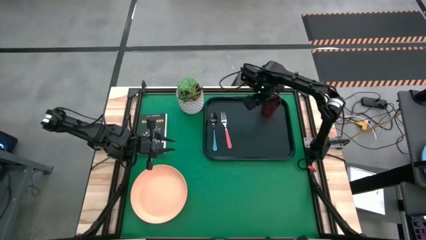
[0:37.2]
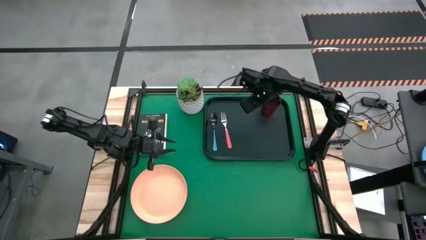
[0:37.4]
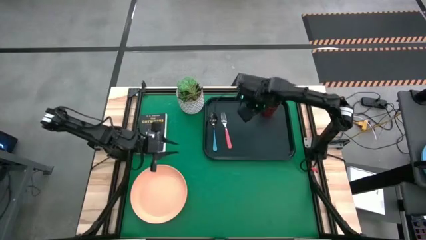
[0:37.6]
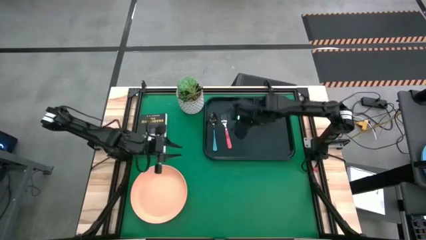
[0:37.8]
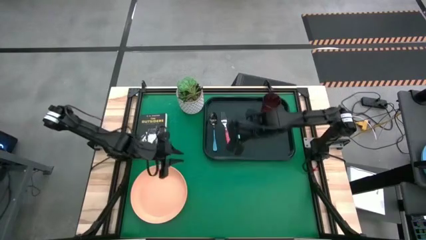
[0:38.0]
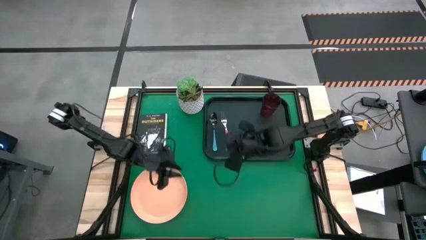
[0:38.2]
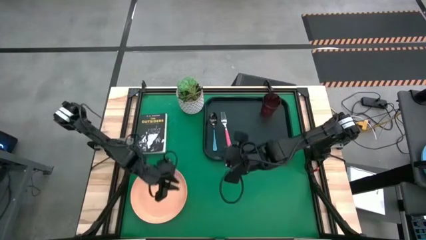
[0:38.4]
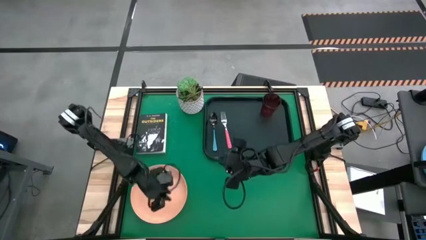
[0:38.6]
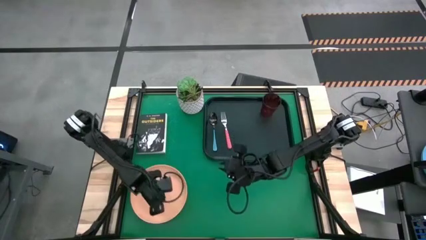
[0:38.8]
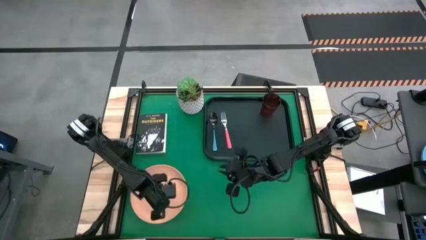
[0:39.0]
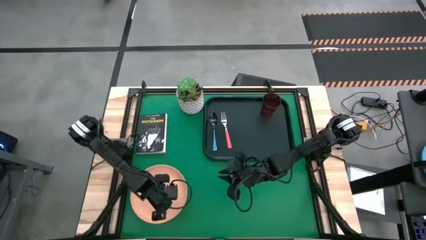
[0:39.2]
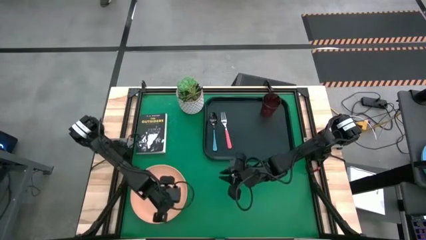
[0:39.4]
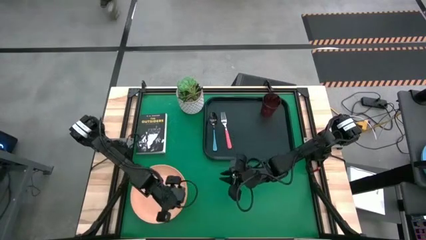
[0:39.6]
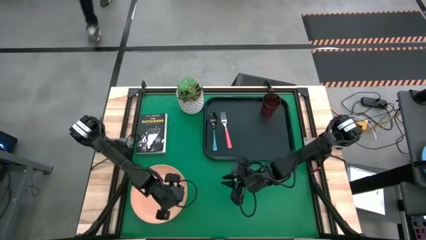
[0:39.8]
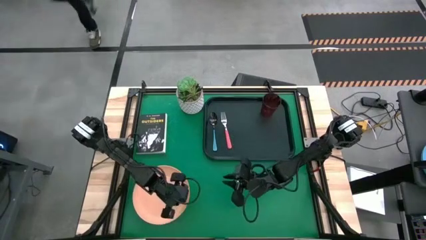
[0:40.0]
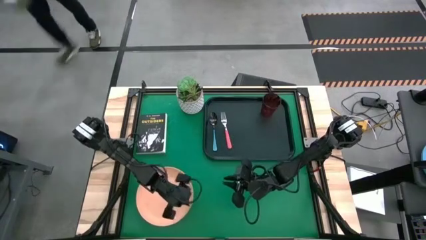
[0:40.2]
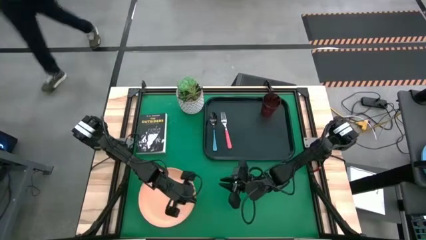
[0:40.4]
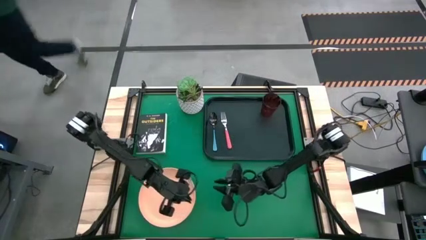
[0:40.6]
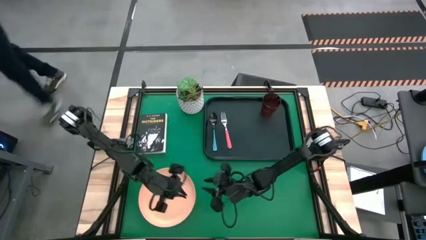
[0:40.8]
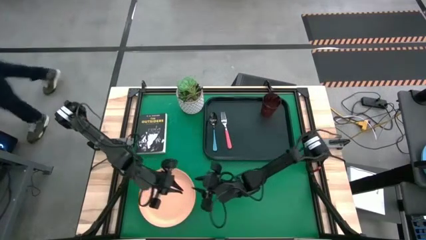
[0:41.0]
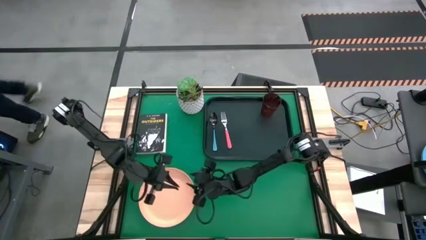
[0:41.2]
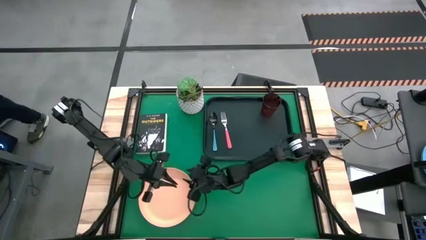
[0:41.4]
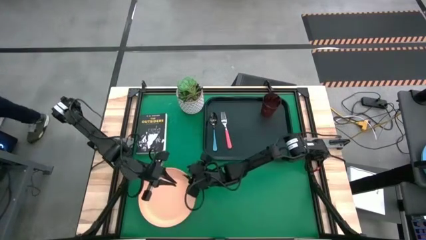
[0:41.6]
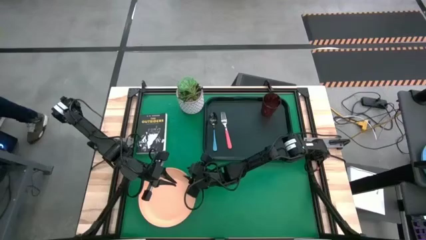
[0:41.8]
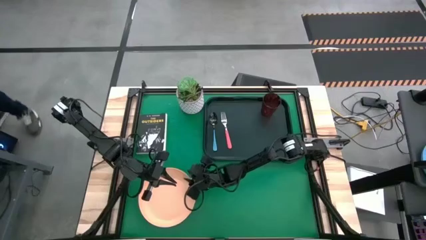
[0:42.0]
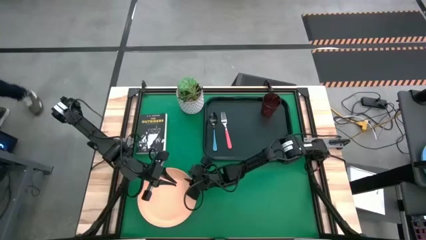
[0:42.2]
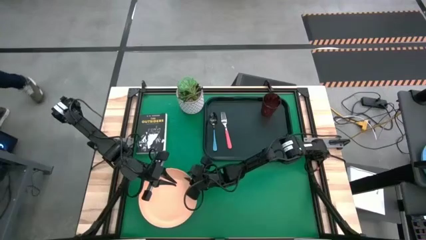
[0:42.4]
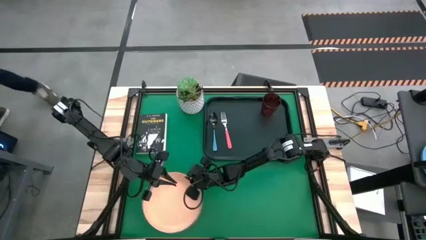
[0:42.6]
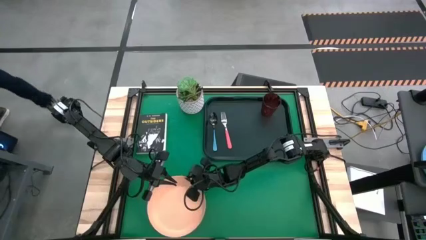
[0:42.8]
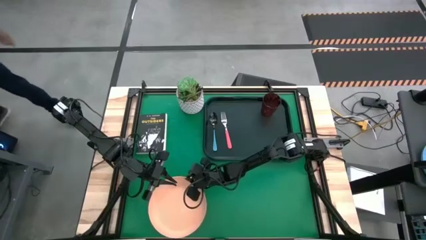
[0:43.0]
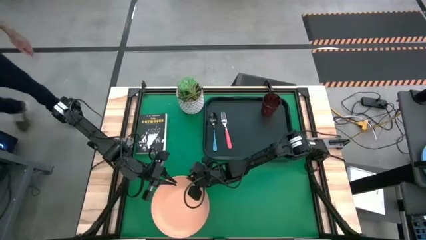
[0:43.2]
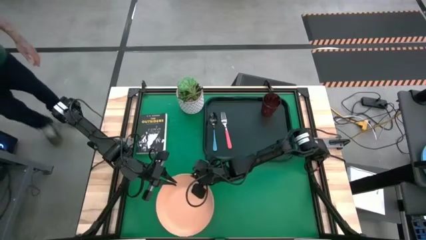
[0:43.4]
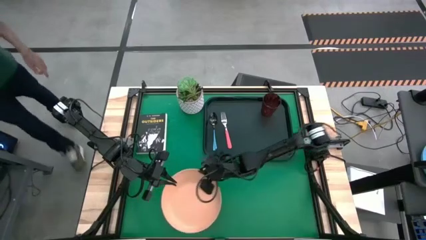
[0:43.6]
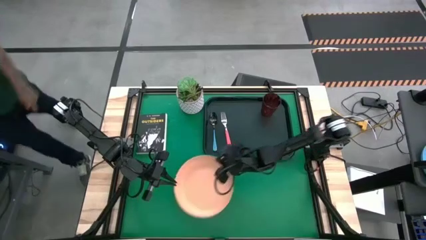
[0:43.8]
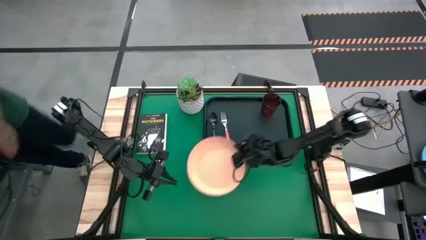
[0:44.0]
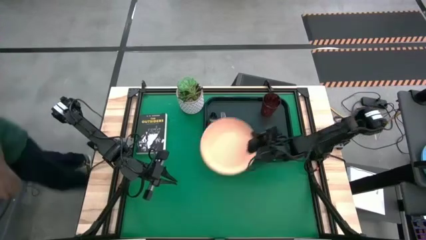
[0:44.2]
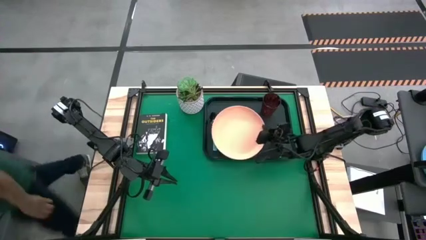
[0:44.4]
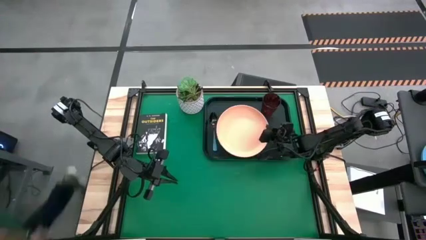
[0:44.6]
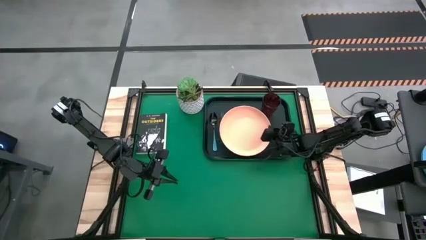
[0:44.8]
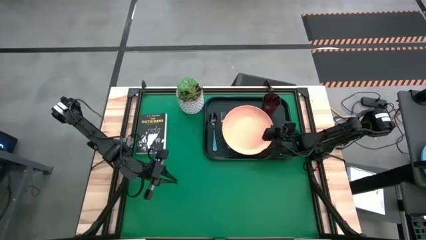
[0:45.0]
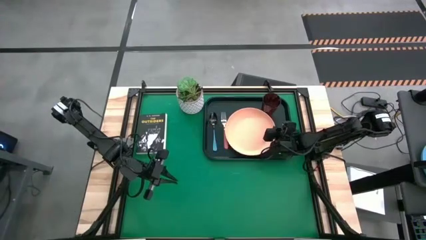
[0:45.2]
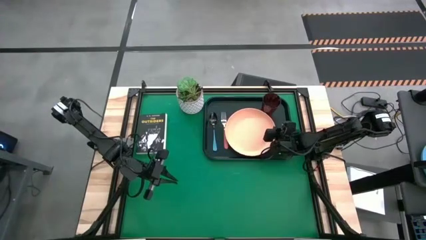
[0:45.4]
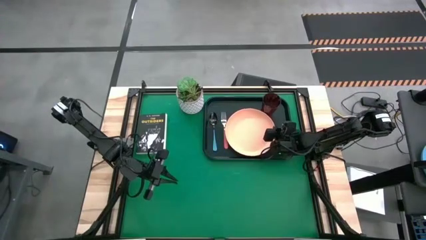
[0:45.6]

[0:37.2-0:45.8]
Task: Pick and place plate/cup/fork/spoon on tray
Put the orange plate on the black tray to the right of the pink fork

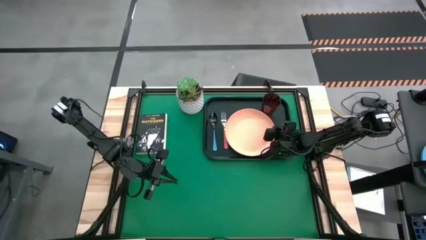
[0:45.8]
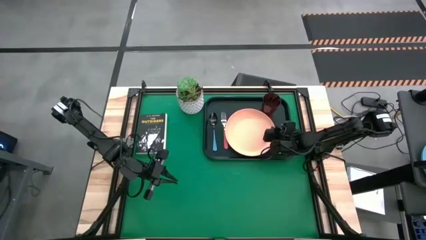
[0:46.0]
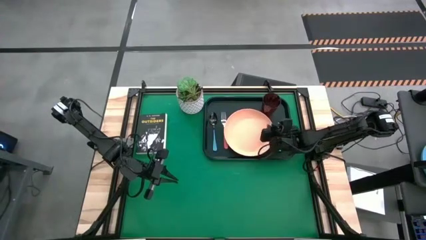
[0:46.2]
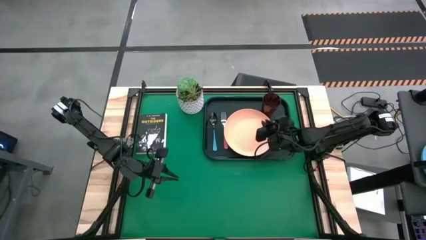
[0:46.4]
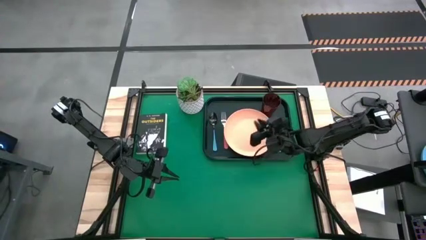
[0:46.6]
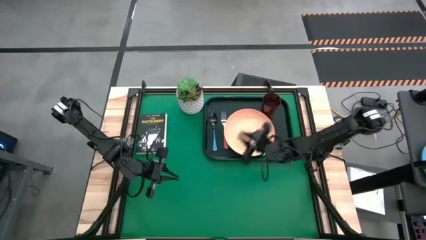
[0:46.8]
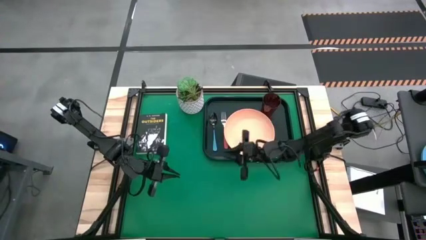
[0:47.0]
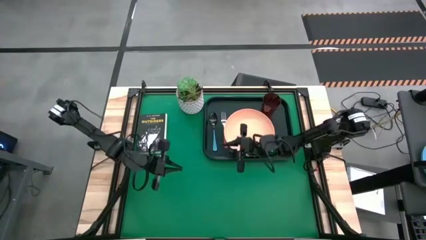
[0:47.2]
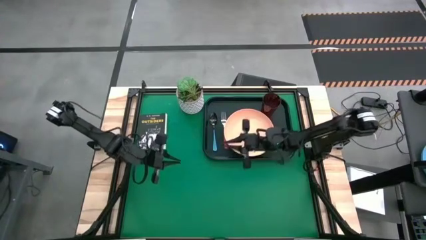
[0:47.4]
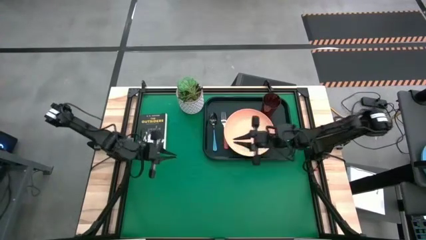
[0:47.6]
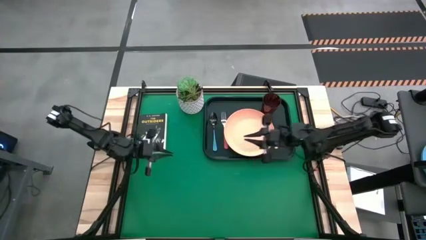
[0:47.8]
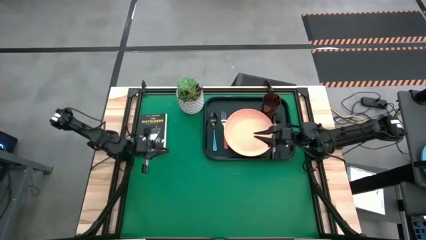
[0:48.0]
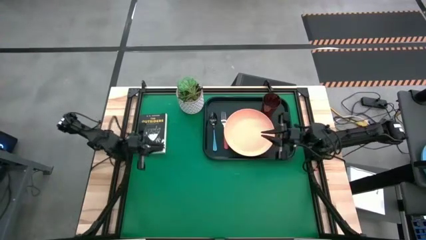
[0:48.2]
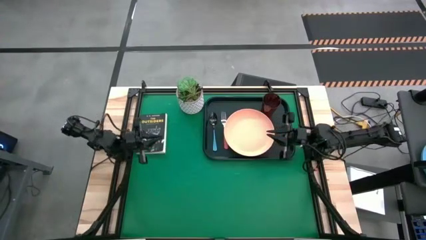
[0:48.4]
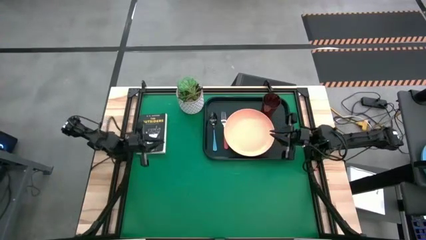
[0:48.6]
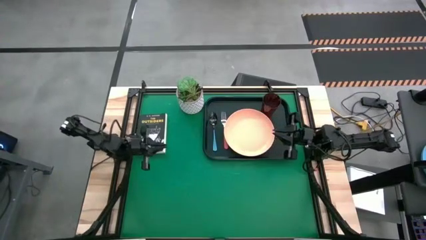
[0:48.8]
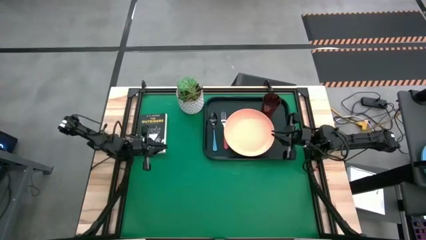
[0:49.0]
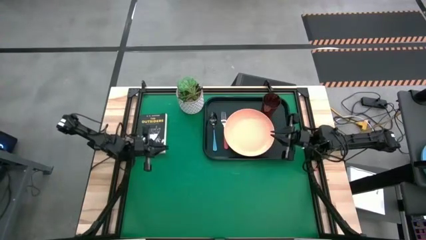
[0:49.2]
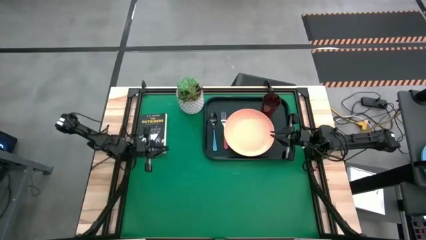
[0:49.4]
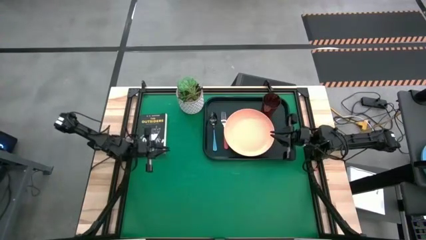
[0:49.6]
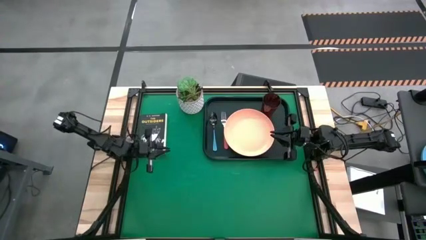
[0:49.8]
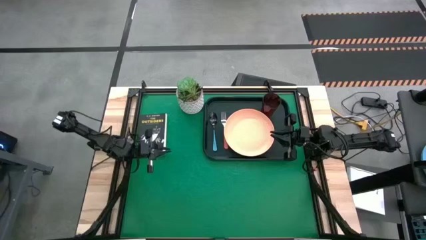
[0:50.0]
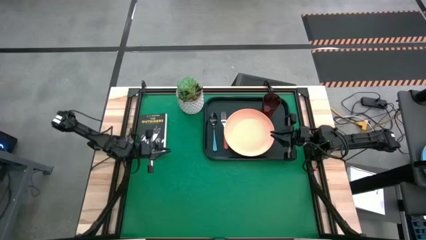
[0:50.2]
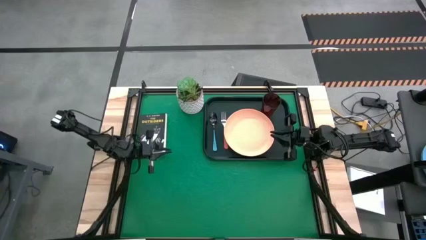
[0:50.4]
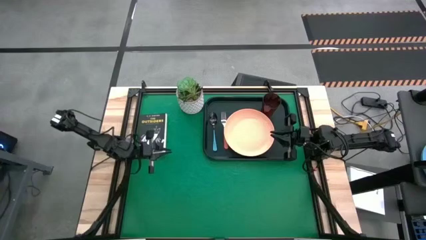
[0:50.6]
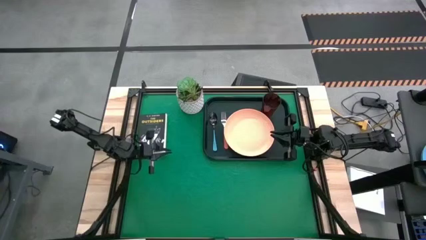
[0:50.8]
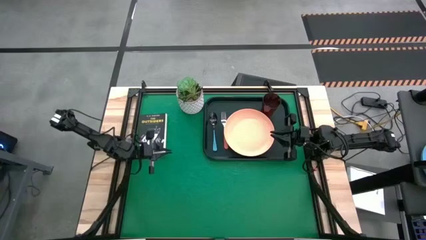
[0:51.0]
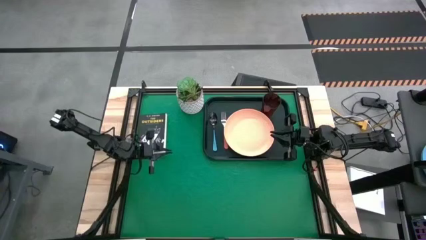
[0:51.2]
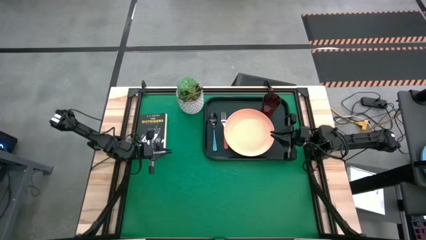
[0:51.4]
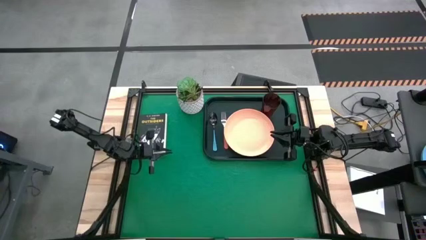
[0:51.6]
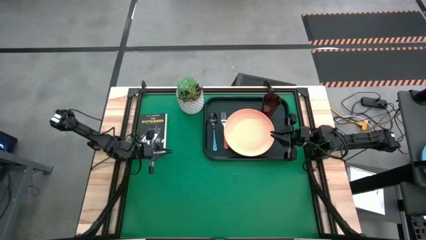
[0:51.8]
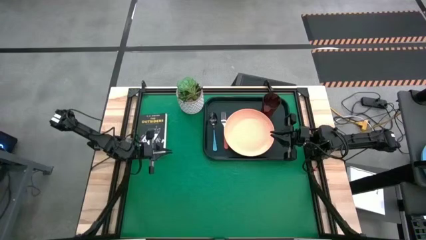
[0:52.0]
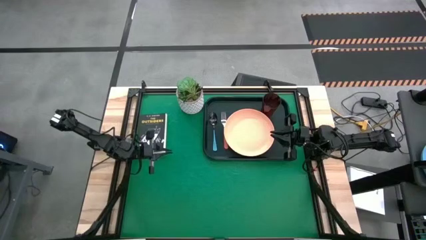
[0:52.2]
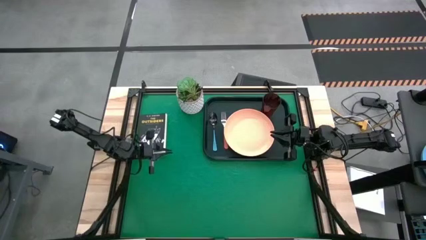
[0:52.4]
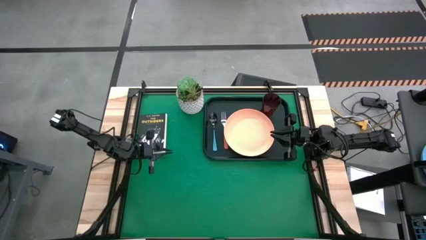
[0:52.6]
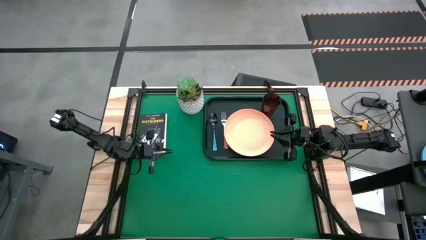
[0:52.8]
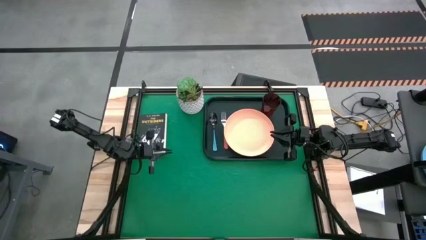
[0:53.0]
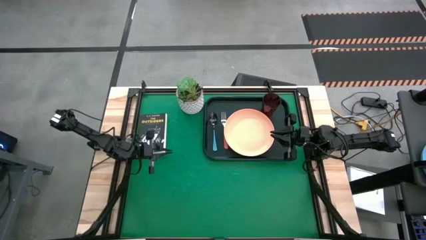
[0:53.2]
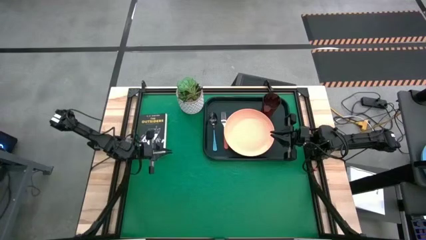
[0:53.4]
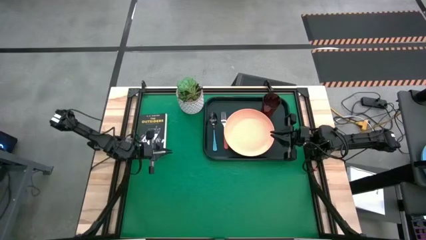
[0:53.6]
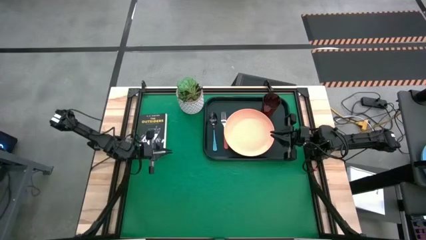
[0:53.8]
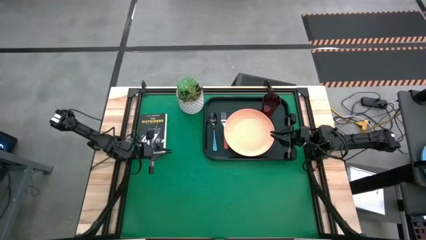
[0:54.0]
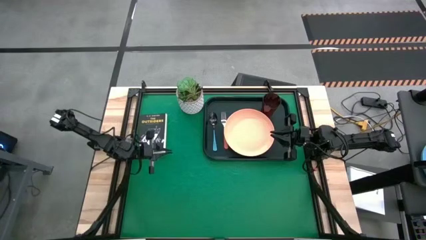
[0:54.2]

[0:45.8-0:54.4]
Return to Home Position
